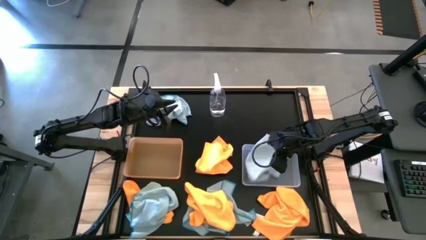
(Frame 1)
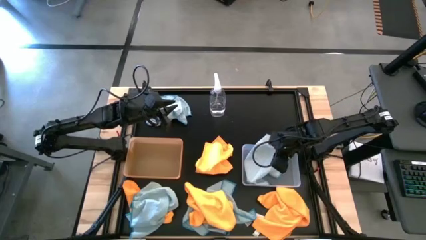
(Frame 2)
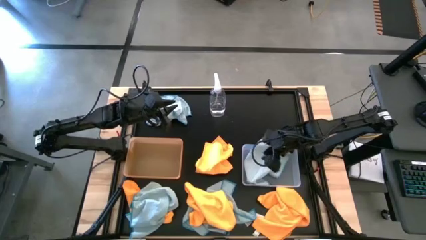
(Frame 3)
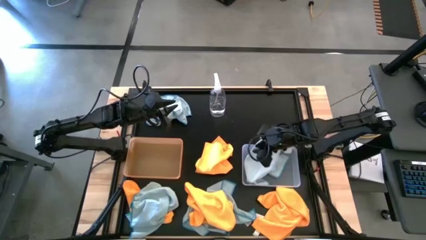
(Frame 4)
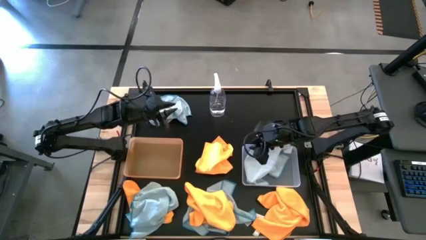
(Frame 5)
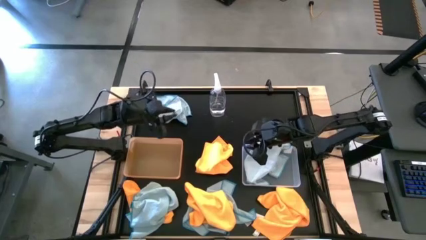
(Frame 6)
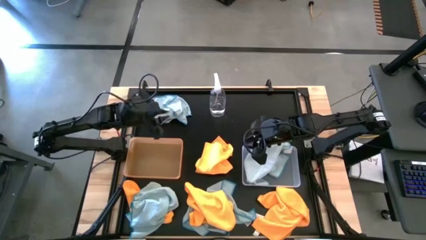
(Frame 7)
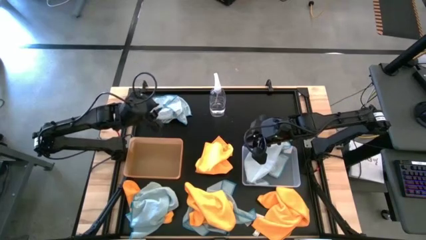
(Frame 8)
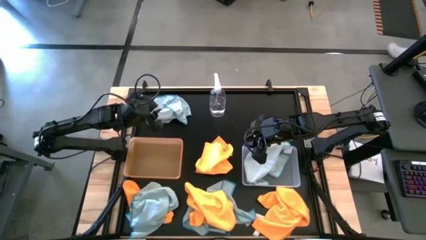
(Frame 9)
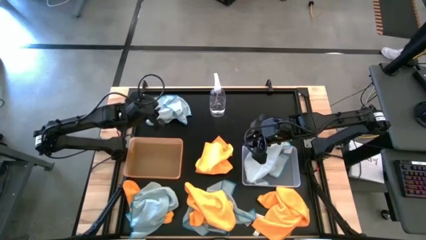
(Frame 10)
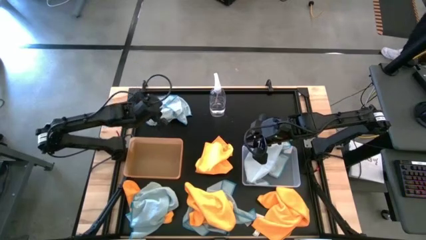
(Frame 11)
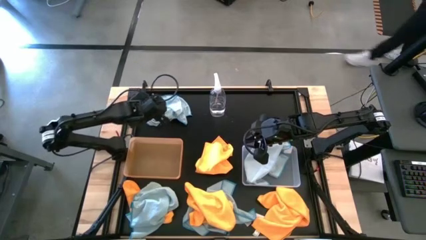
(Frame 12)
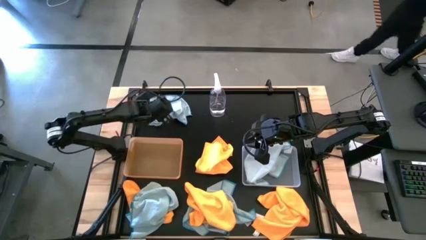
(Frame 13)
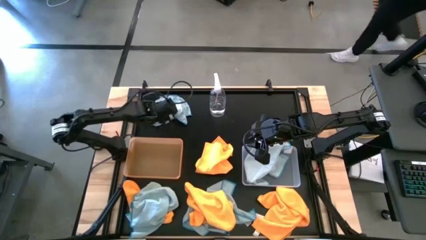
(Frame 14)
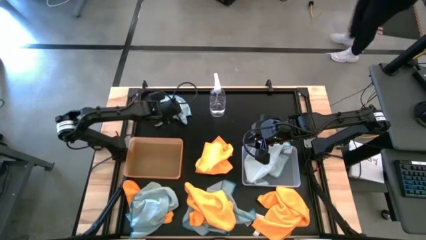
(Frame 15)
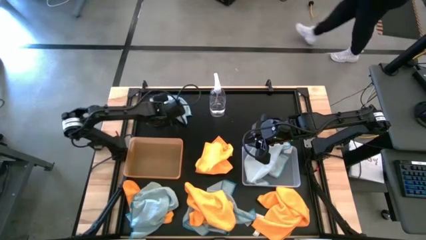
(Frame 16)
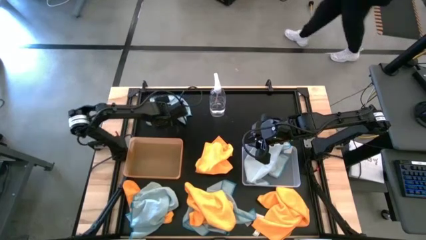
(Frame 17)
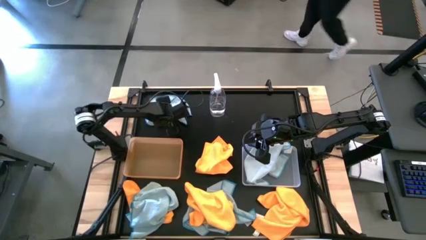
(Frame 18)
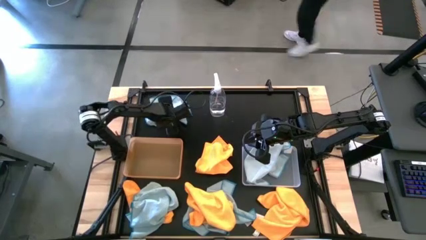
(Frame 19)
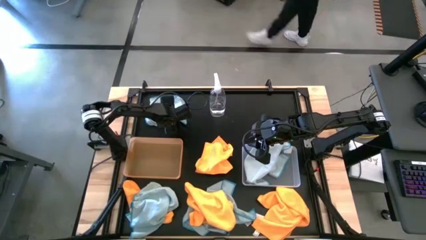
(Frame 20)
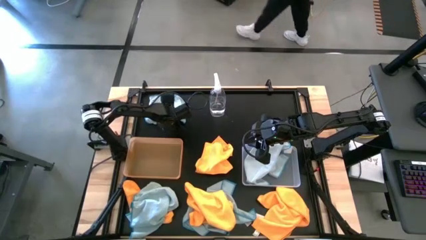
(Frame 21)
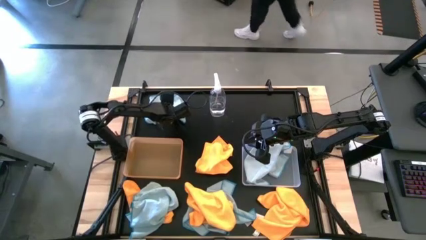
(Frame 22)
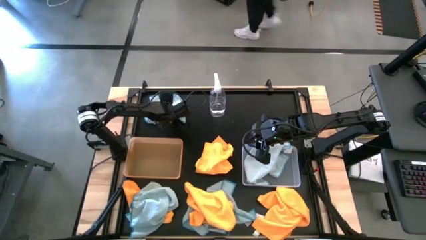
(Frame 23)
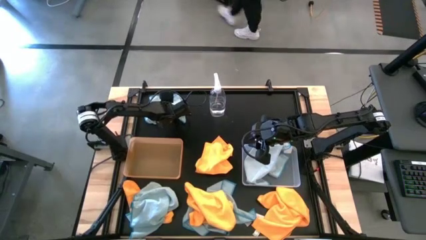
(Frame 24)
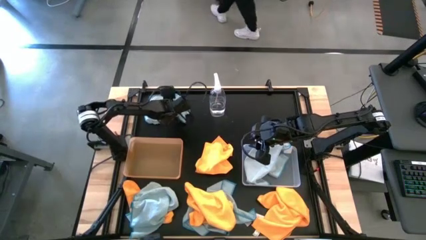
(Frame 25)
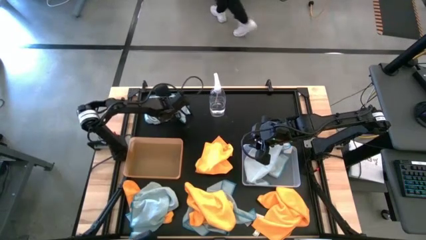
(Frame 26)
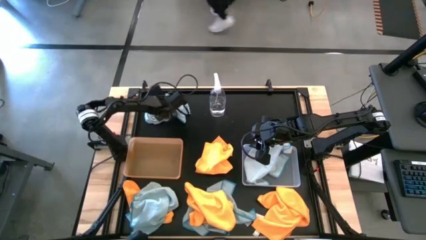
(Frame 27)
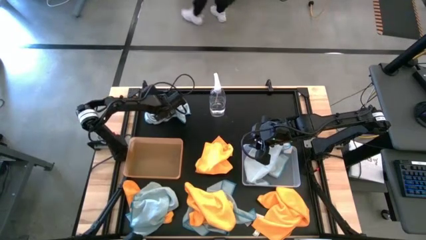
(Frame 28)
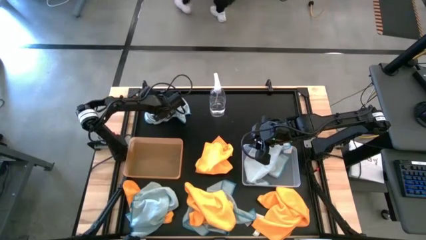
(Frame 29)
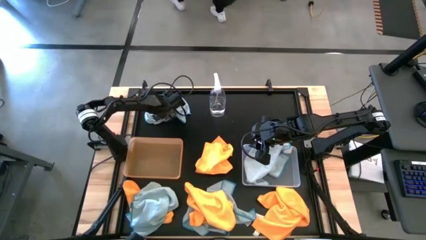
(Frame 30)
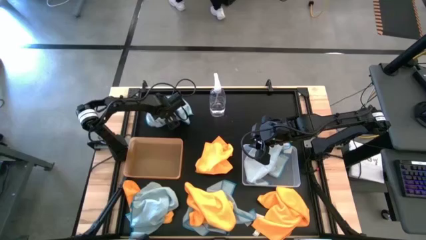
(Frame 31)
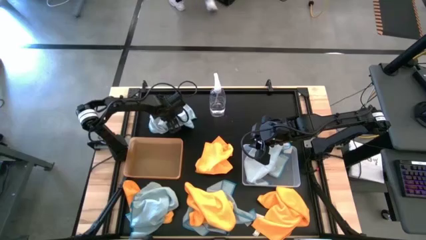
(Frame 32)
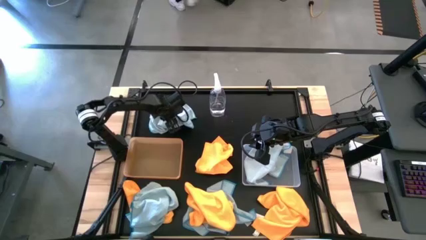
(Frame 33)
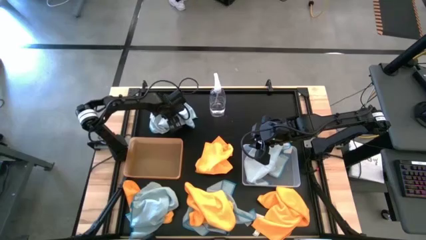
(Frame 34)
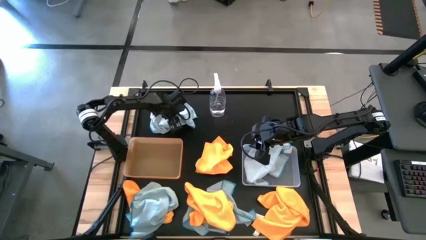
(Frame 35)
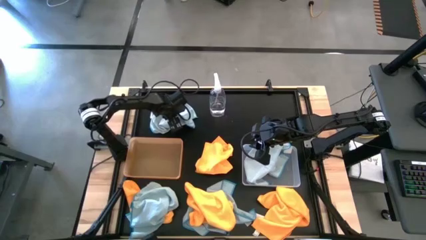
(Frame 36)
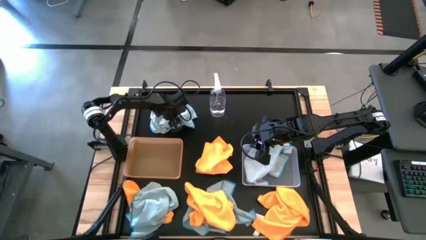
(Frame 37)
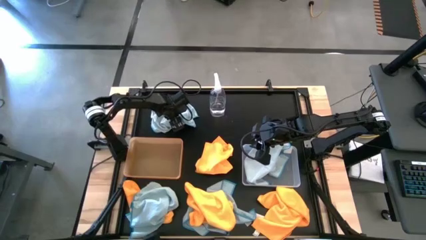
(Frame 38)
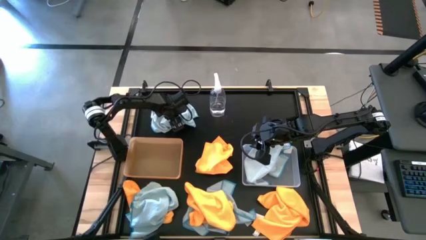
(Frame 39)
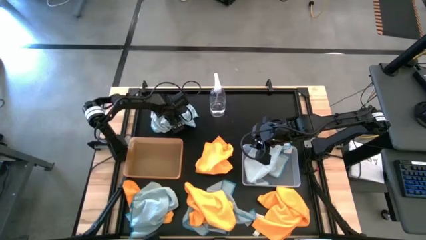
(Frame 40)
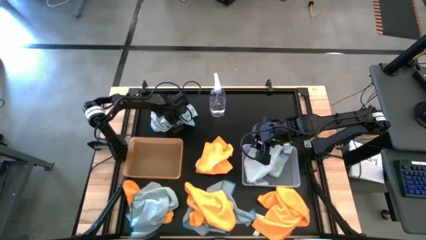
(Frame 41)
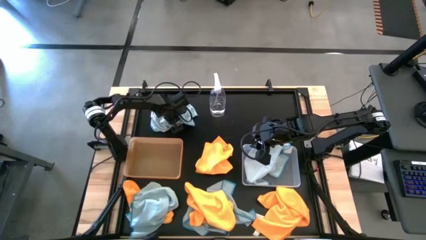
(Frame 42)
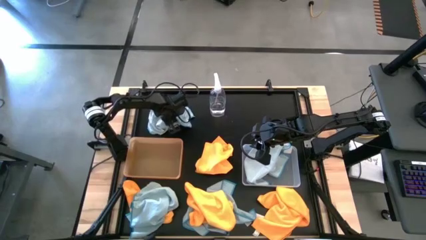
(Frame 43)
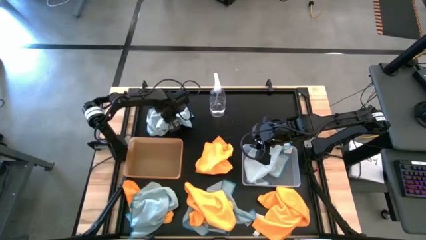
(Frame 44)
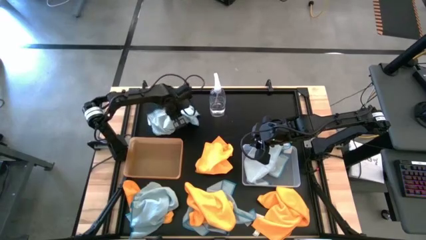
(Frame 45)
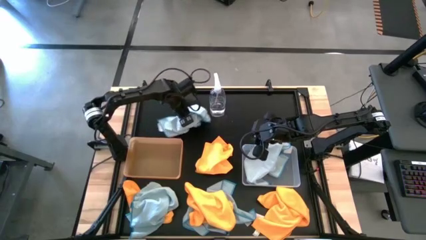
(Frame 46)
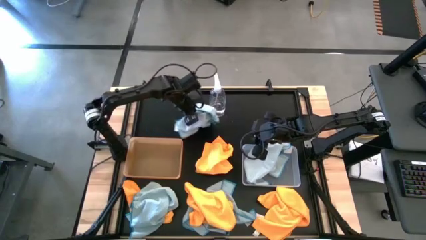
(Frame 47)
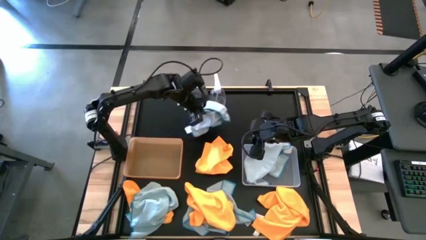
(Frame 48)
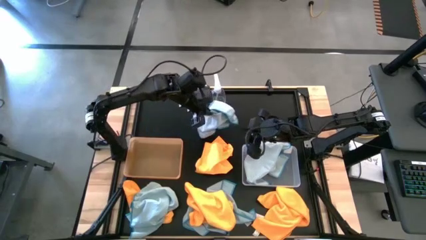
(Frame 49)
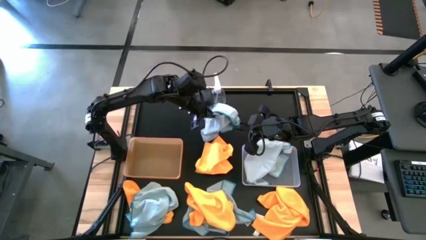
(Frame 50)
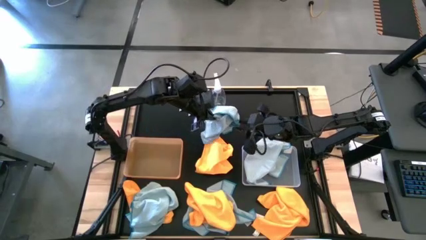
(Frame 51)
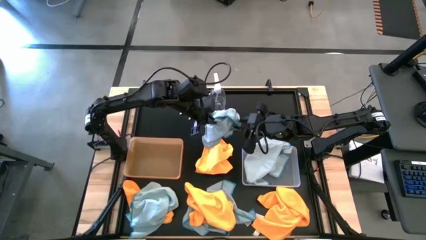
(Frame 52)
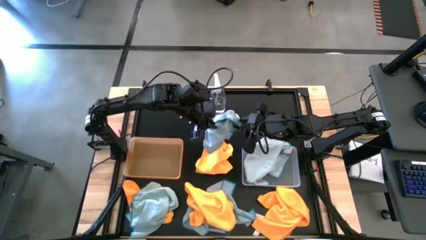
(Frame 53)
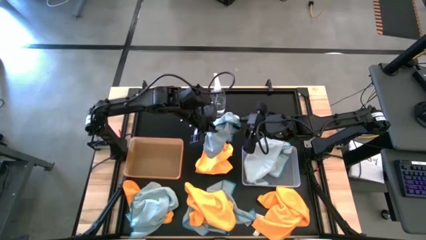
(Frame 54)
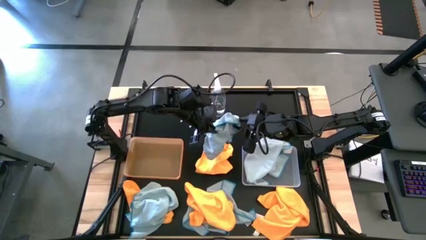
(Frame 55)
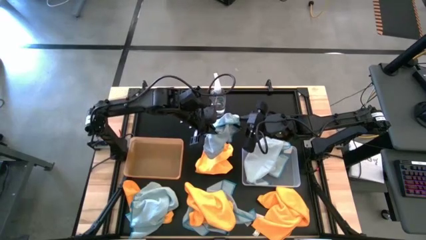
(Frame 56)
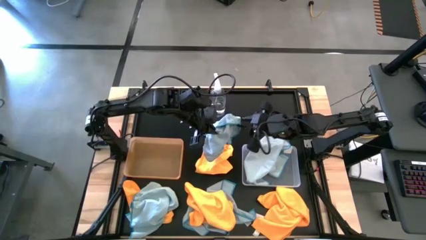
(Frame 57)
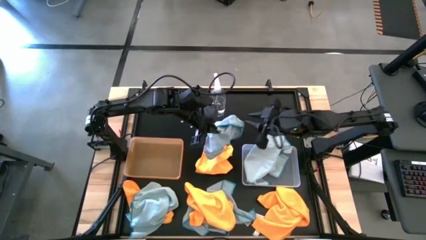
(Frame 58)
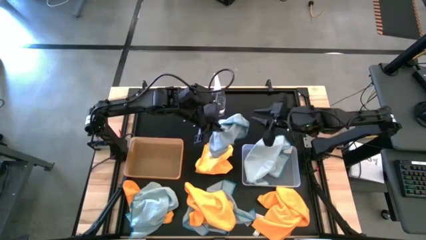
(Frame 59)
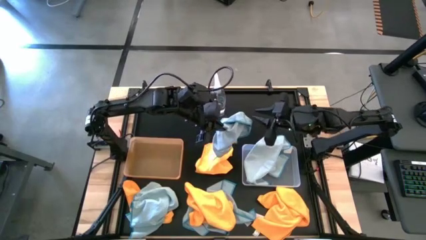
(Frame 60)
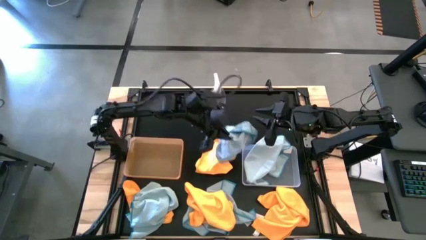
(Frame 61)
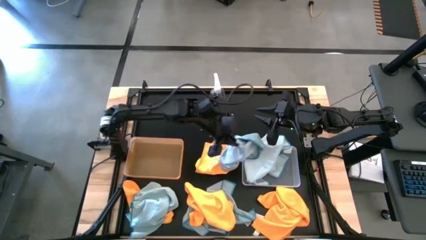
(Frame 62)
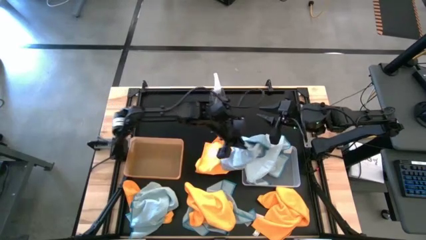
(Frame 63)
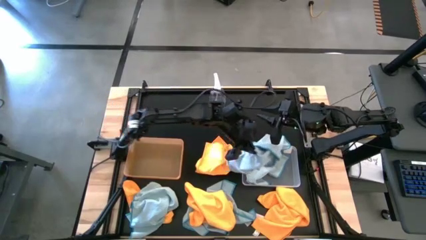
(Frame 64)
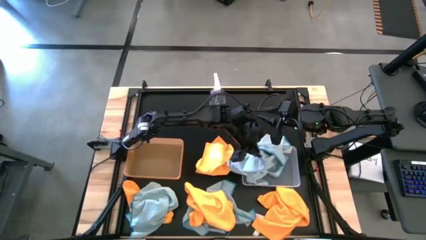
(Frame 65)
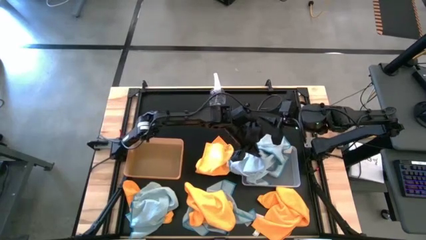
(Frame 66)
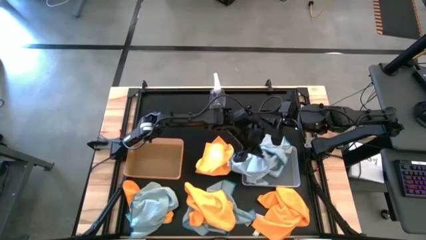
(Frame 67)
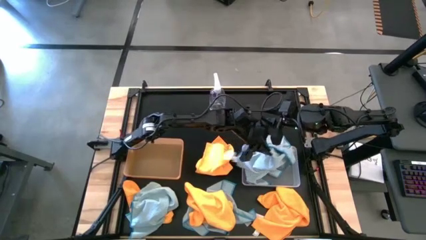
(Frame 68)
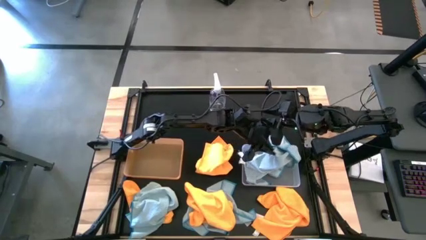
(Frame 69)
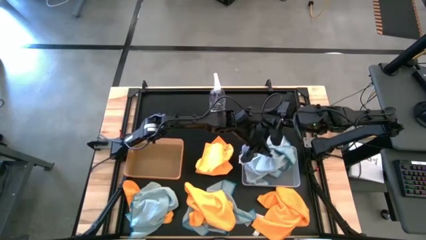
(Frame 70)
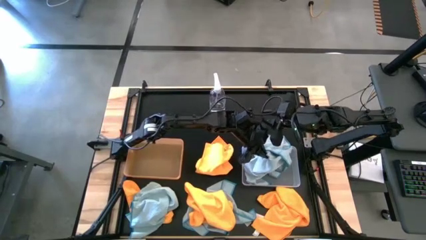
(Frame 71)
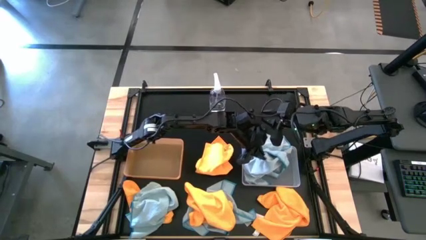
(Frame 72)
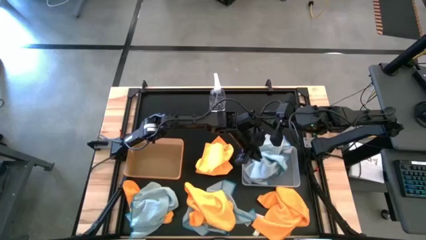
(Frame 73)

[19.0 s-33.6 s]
Task: Sort microfiber towel by color & place in baskets
Put the top blue microfiber cloth into the transparent bin
